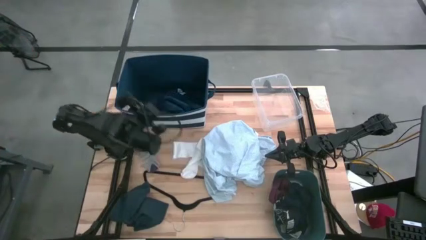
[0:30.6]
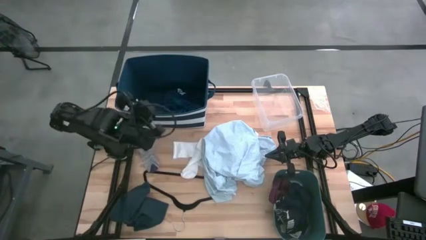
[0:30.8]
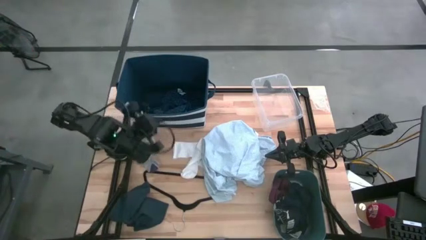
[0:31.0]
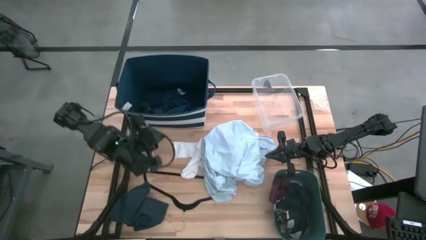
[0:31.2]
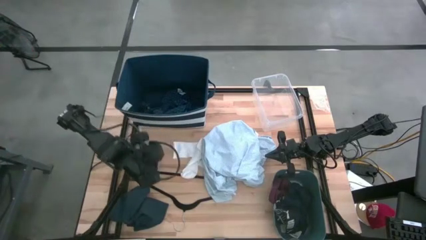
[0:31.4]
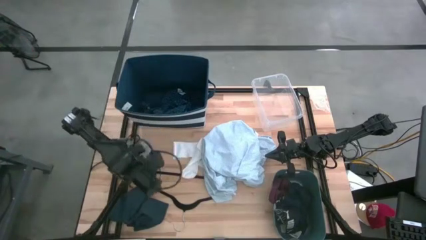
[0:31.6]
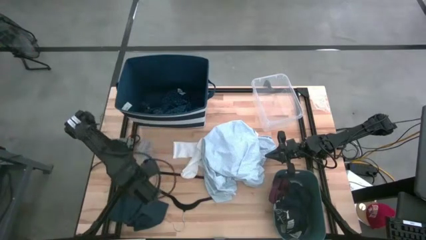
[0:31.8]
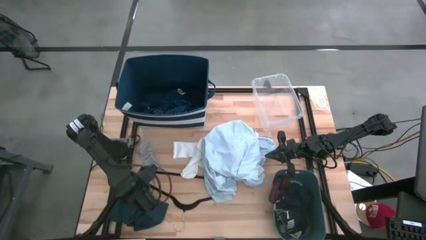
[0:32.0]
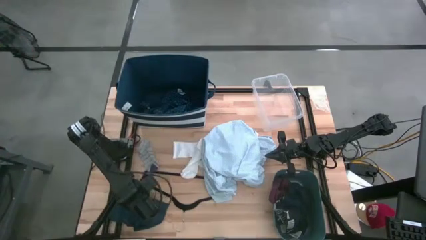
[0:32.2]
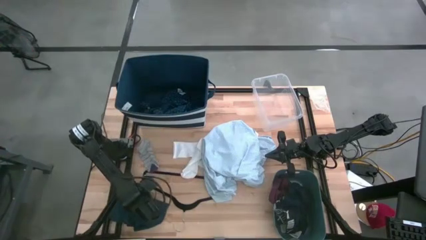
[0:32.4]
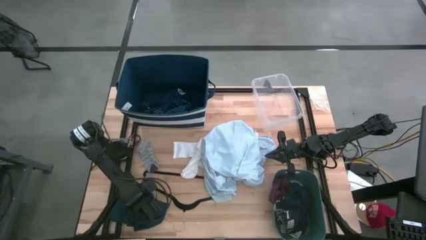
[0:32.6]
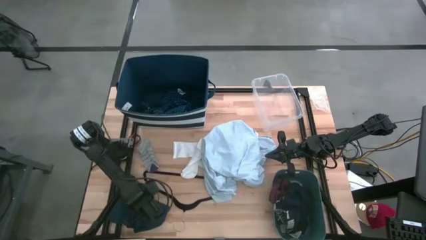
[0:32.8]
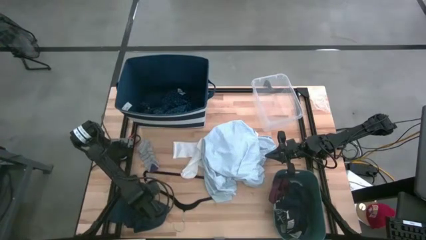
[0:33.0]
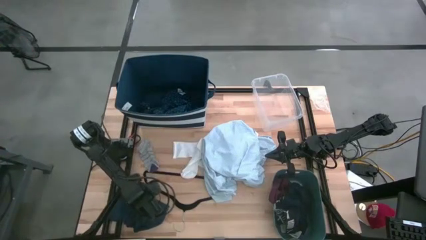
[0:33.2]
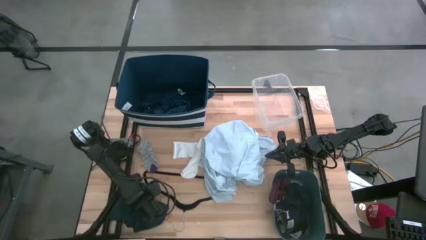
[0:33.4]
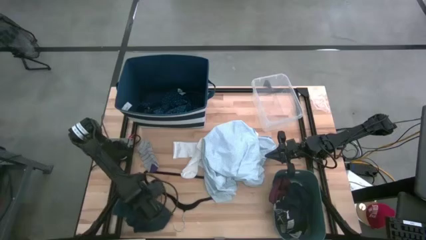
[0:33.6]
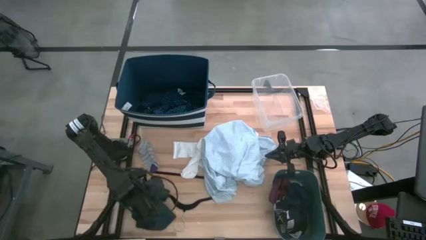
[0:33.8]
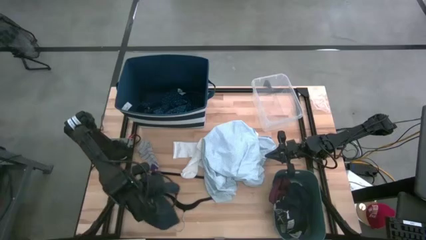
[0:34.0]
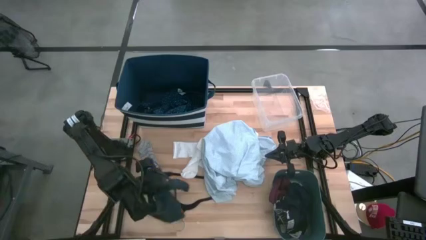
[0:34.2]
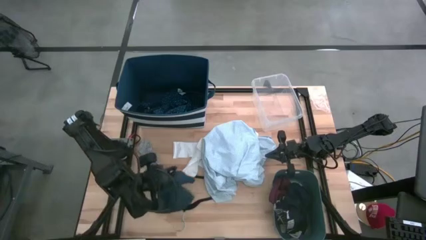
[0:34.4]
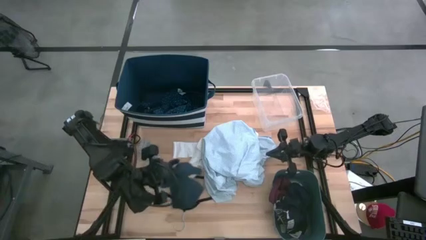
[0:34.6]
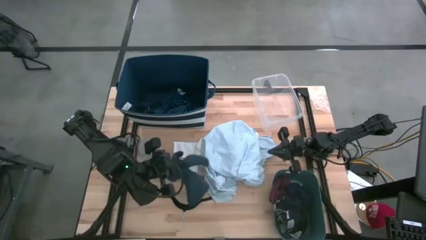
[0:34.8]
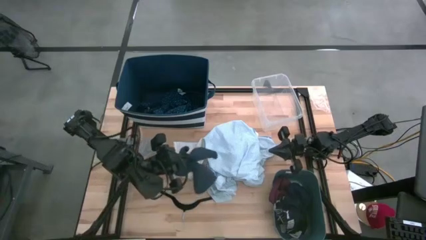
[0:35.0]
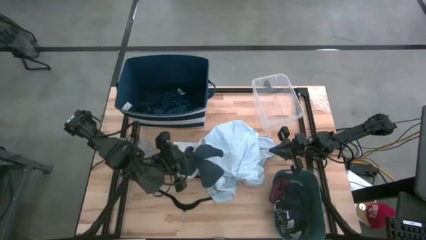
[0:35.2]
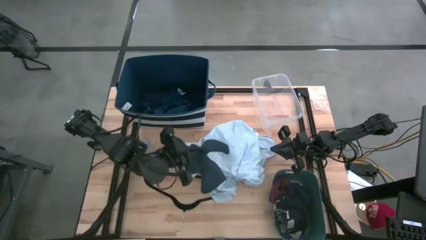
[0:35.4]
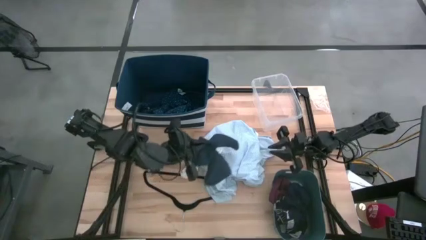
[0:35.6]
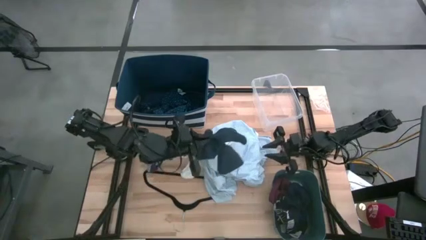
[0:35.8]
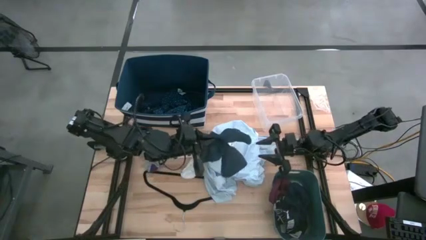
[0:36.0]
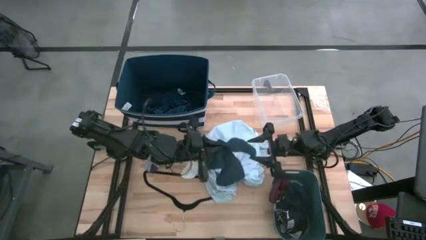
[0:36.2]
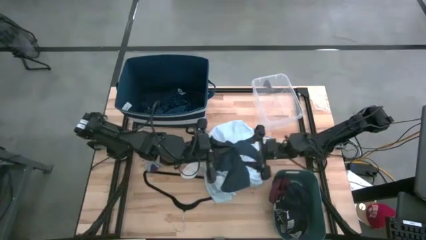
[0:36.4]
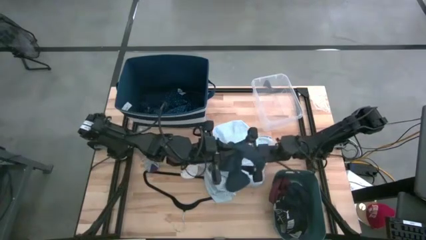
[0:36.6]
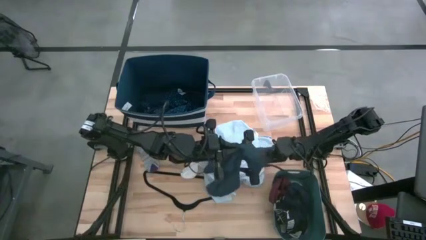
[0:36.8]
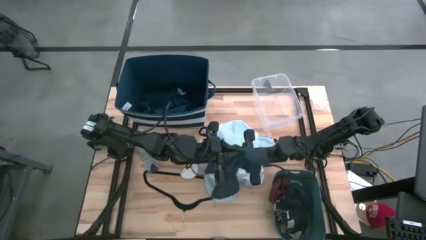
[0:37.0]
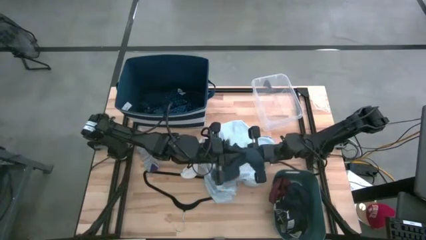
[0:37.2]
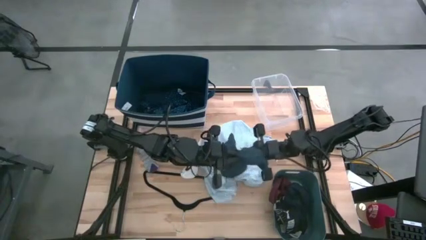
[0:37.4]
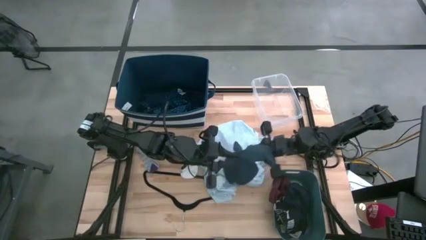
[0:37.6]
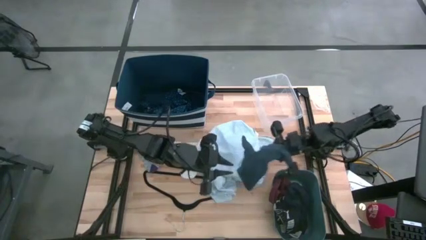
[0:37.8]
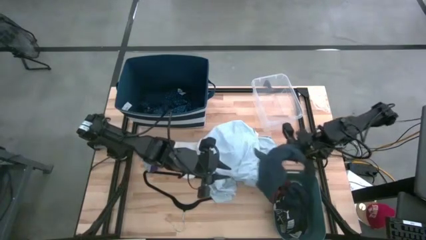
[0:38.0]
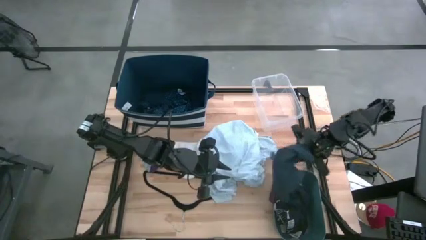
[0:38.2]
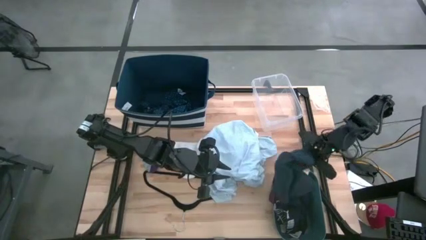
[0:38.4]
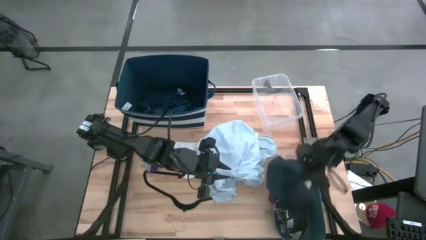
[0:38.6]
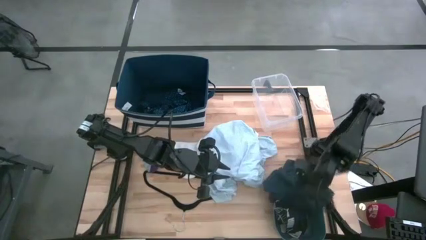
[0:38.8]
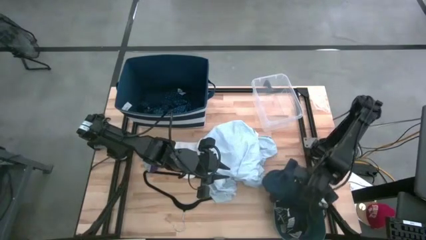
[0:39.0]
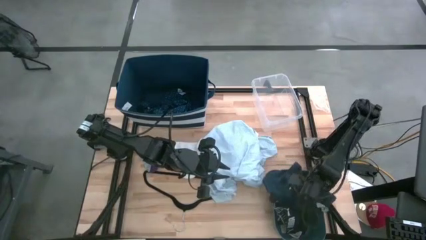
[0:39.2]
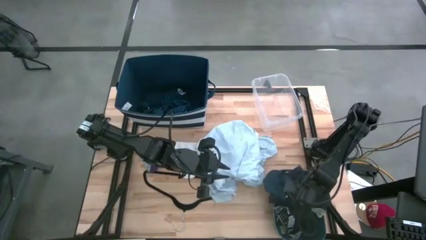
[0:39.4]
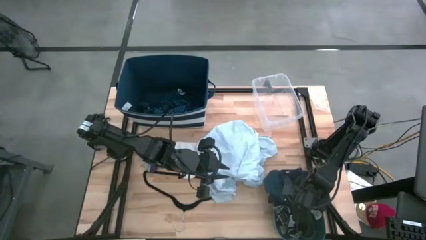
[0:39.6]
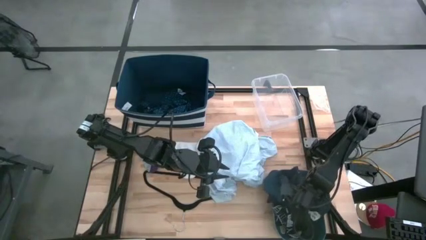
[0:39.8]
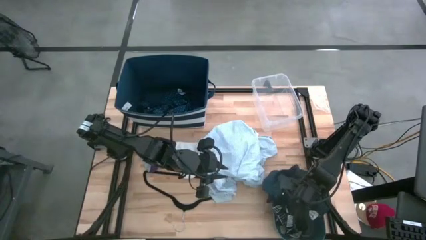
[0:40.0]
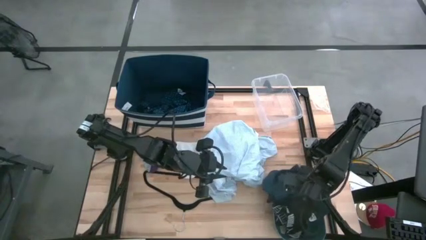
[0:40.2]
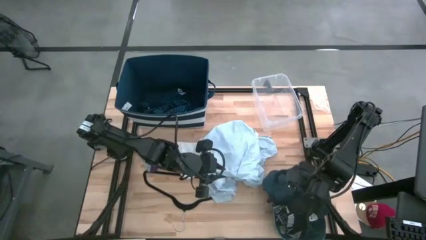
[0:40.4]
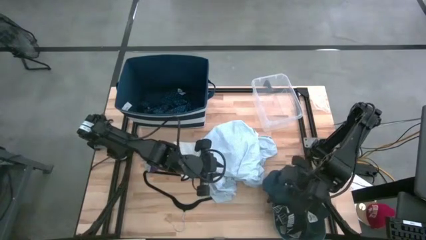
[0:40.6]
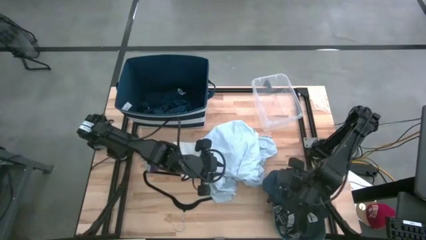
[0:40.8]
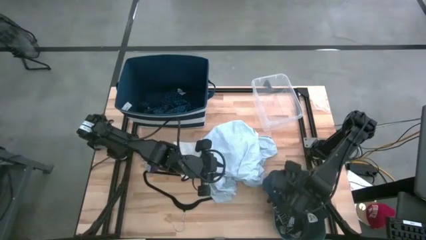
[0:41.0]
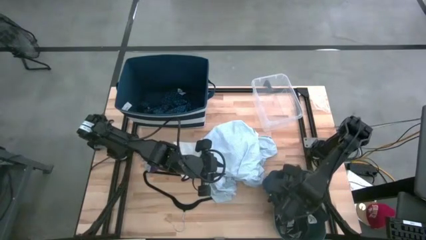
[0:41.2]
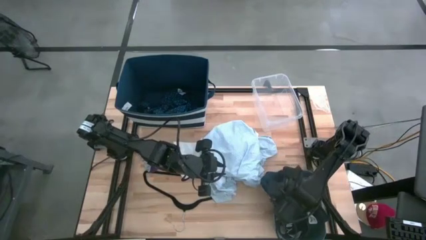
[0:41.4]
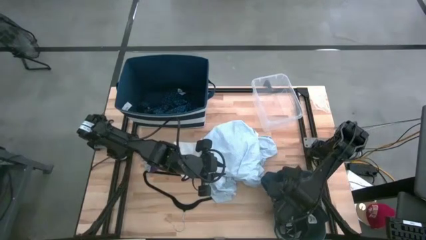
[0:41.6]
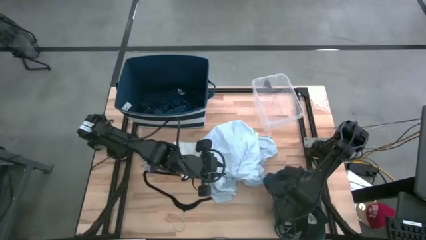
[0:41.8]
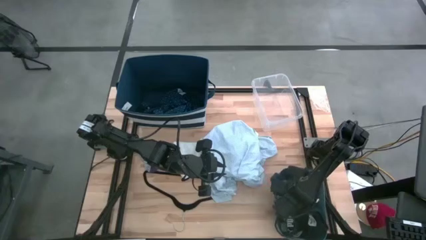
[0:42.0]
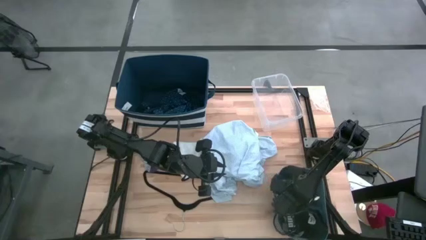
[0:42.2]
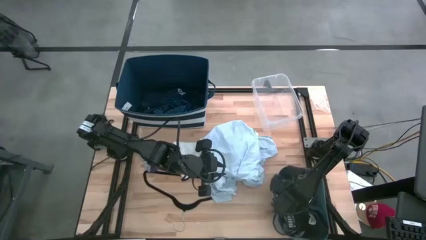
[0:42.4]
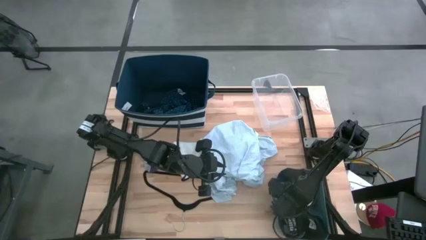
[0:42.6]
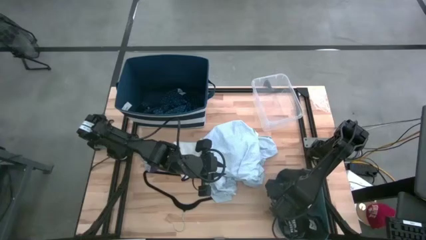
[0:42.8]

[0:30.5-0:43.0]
Task: Pick & Place Cloths
Put the gray boxer into the green bin

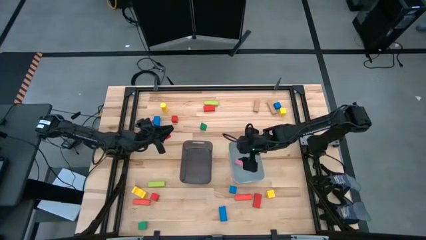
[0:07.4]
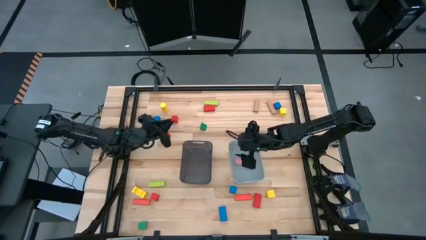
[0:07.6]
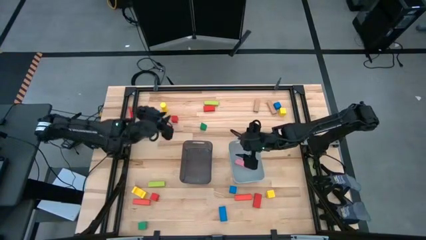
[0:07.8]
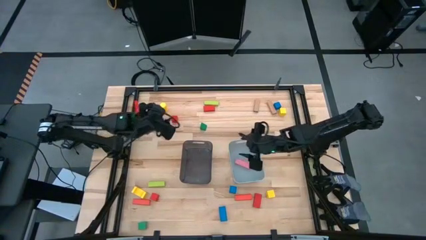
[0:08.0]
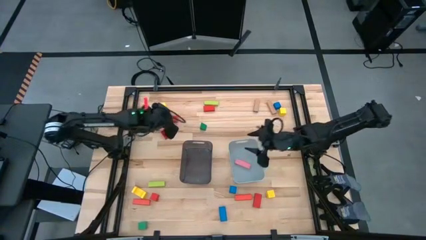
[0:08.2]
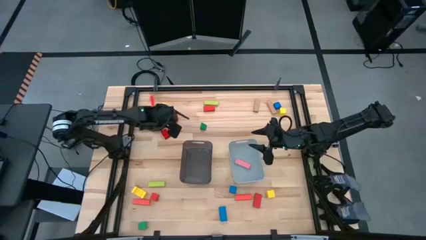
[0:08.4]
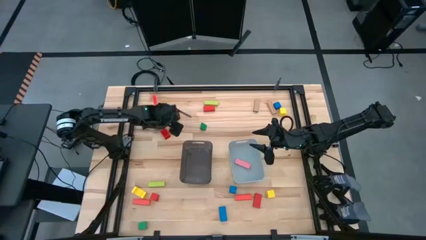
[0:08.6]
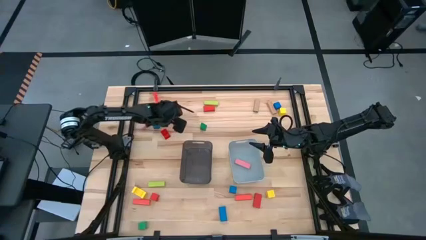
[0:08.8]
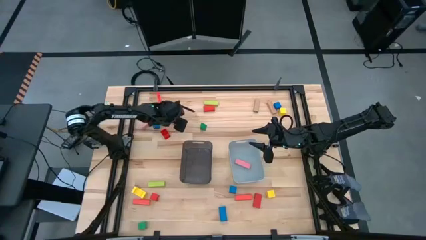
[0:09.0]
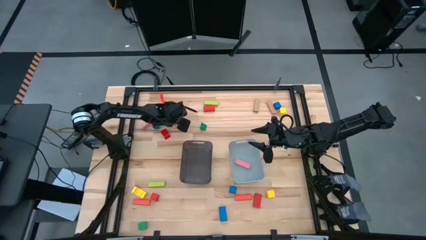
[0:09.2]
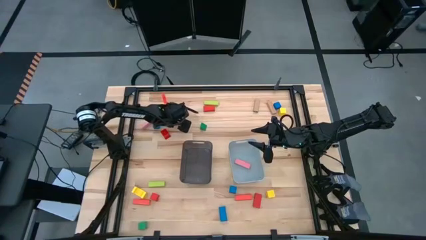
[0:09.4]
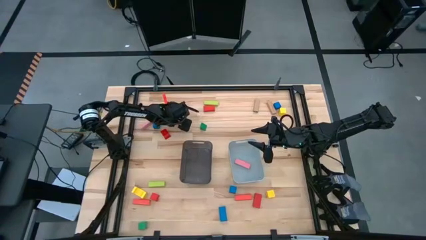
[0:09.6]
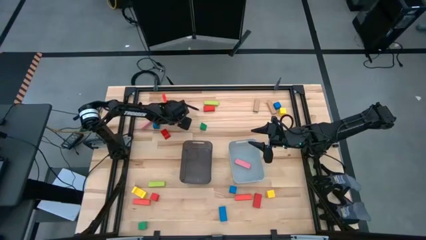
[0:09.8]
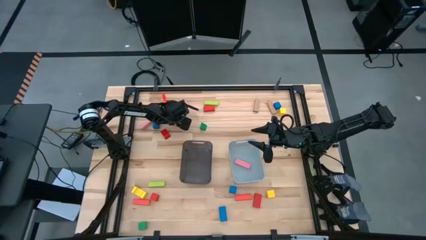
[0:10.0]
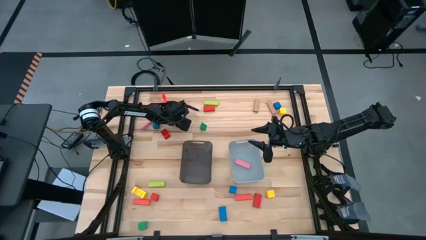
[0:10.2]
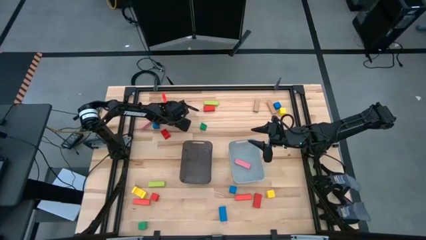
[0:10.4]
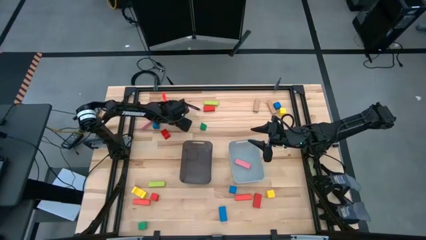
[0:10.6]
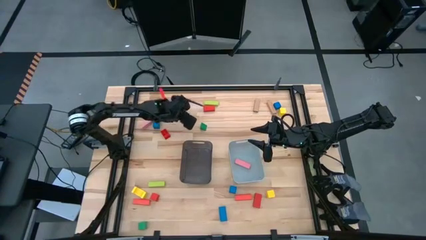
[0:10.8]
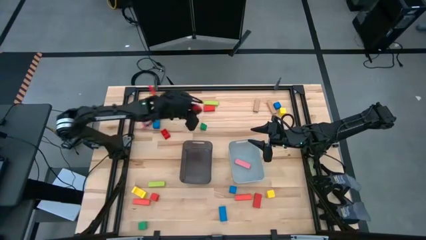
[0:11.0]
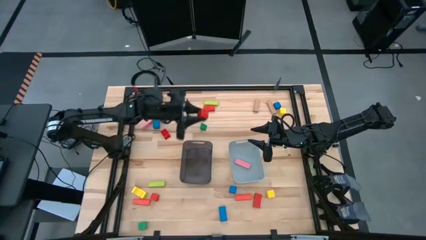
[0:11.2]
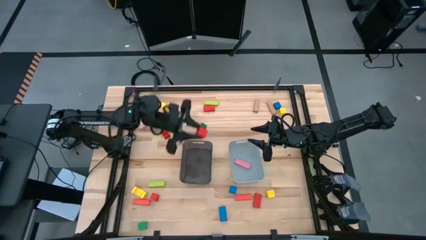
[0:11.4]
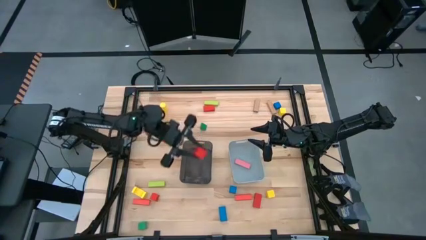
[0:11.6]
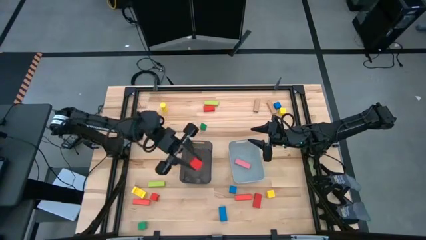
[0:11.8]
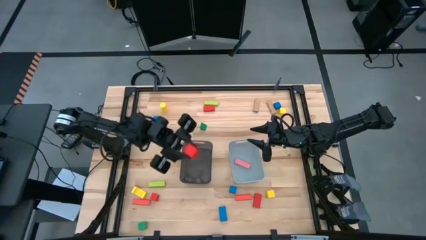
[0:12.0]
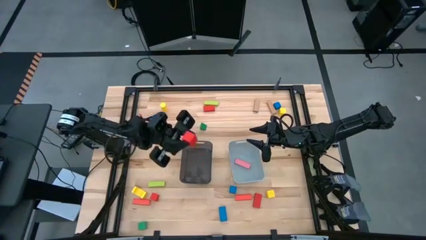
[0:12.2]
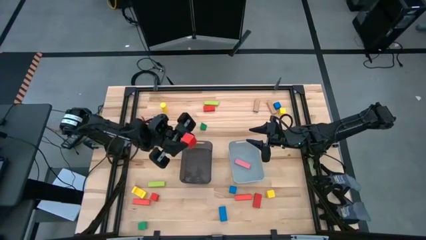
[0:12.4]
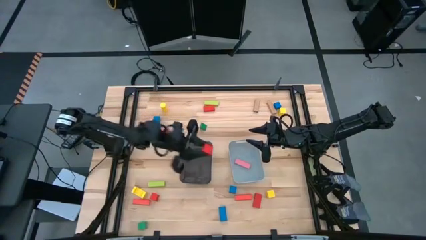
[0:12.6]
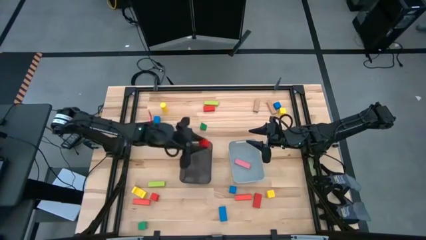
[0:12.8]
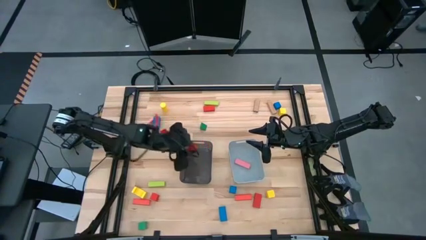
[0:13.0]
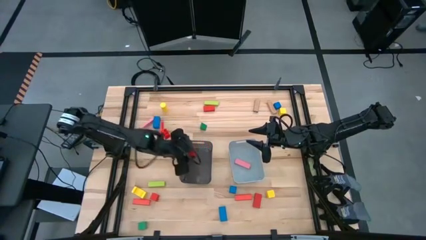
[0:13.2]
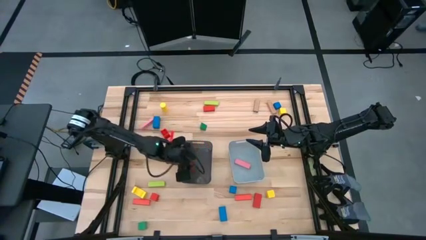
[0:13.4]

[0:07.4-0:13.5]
Task: Sort blocks by size
Put the top small red block into the black bin
